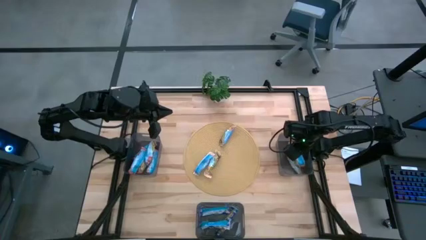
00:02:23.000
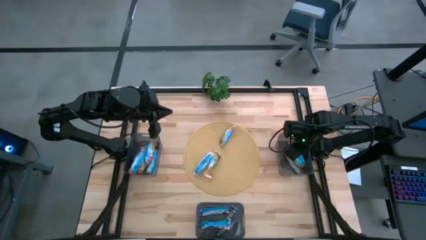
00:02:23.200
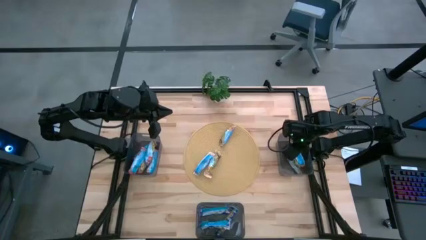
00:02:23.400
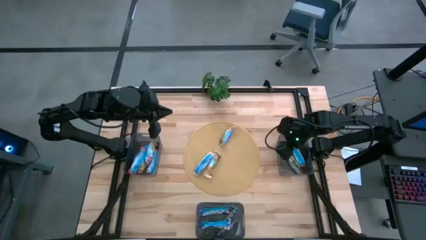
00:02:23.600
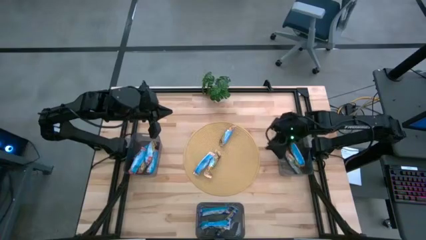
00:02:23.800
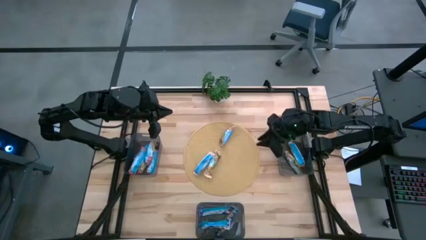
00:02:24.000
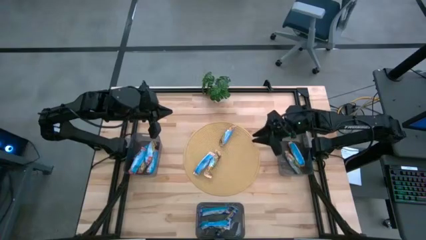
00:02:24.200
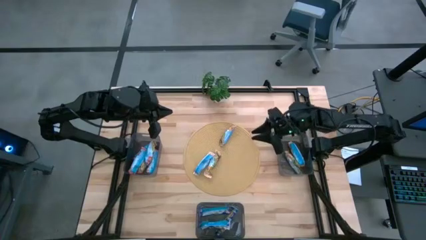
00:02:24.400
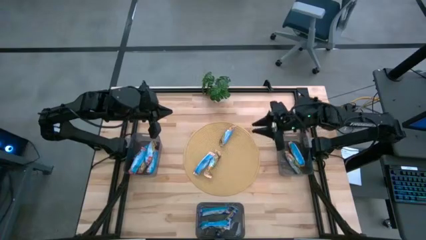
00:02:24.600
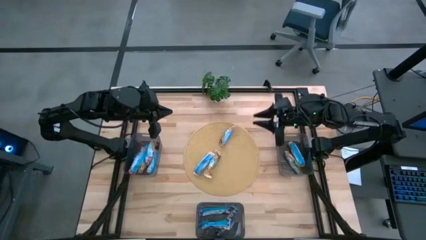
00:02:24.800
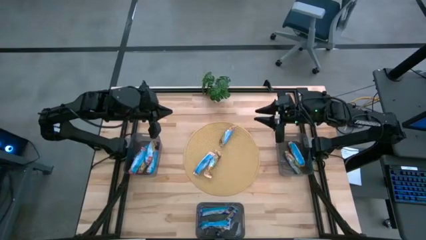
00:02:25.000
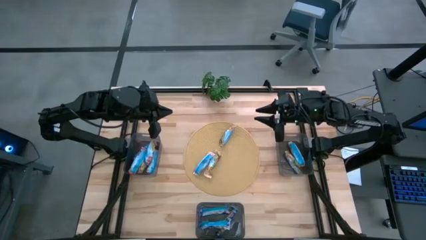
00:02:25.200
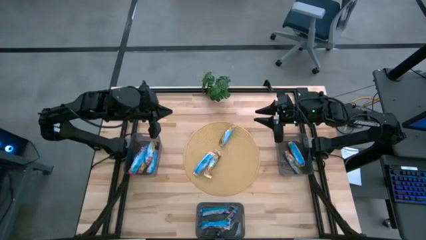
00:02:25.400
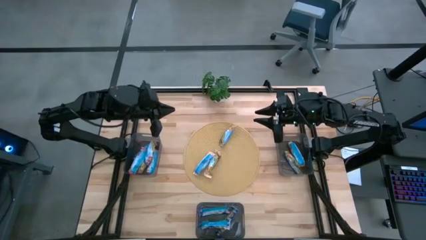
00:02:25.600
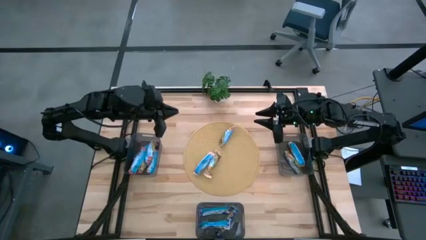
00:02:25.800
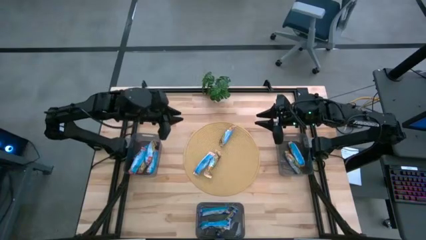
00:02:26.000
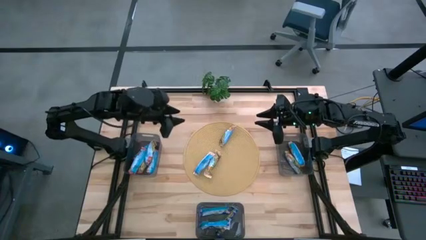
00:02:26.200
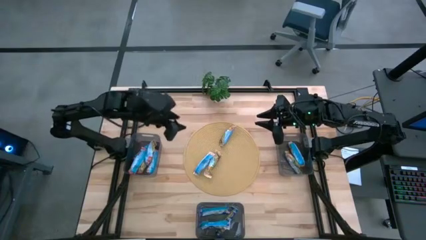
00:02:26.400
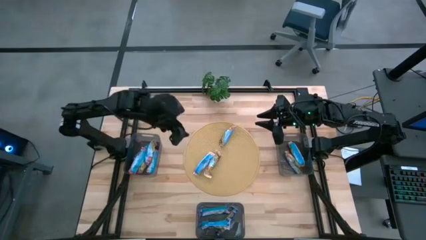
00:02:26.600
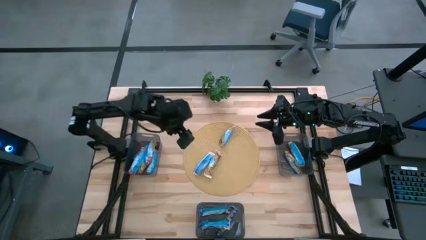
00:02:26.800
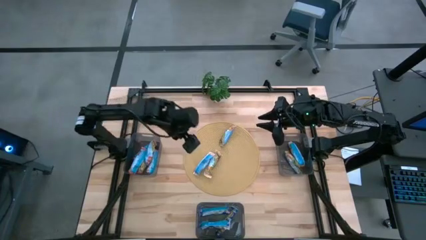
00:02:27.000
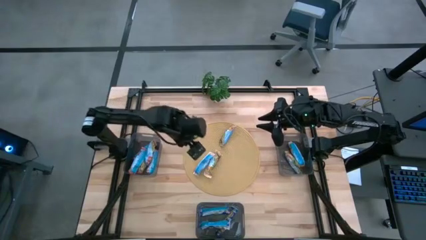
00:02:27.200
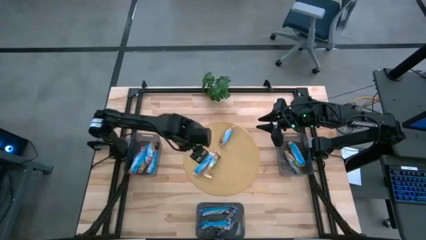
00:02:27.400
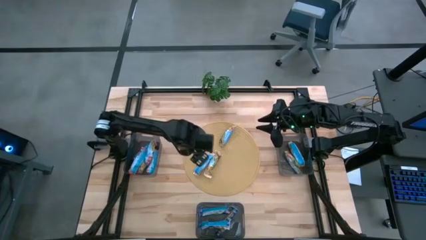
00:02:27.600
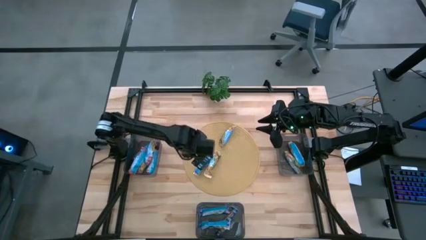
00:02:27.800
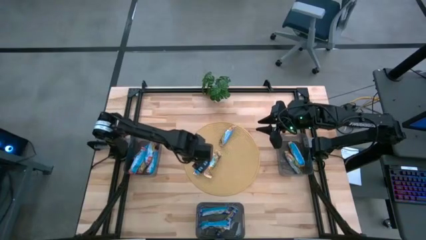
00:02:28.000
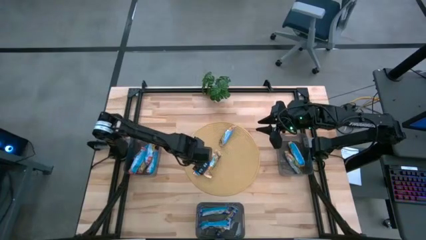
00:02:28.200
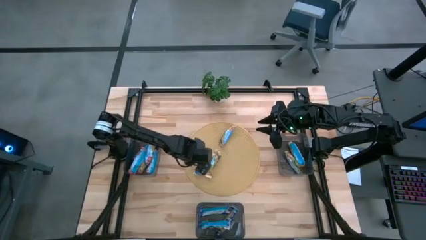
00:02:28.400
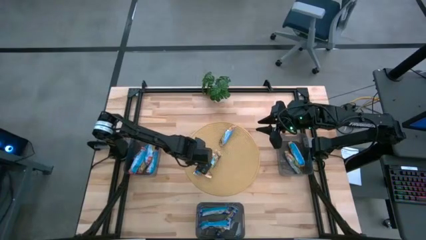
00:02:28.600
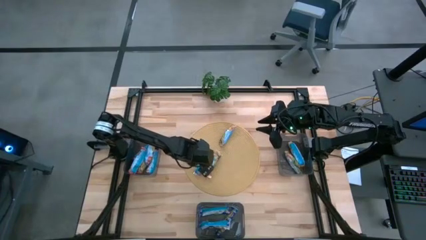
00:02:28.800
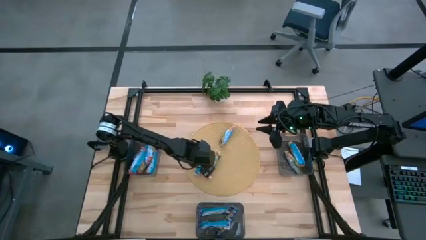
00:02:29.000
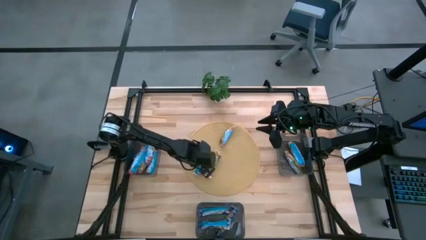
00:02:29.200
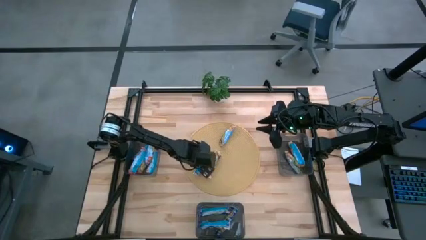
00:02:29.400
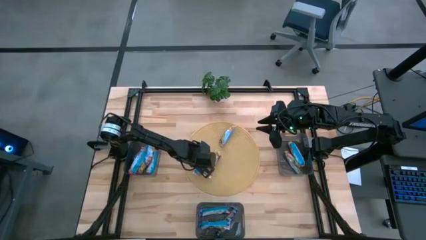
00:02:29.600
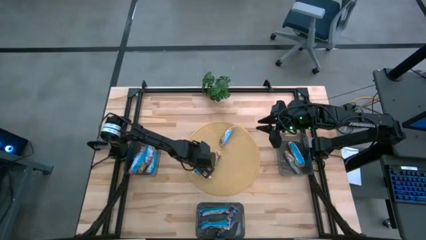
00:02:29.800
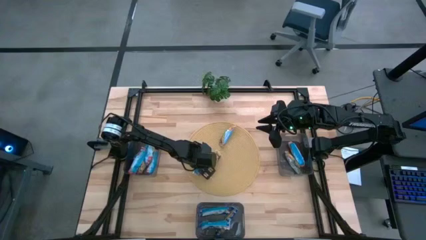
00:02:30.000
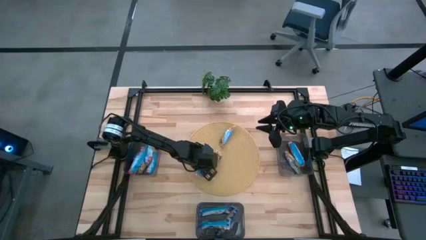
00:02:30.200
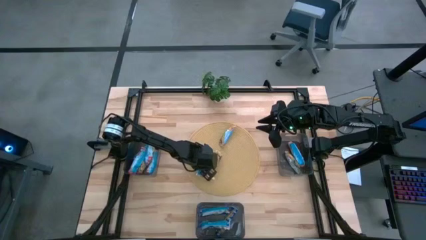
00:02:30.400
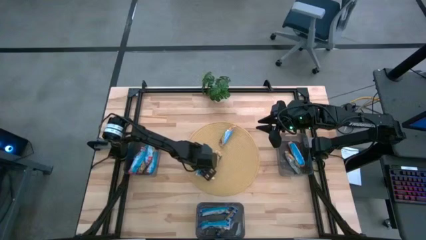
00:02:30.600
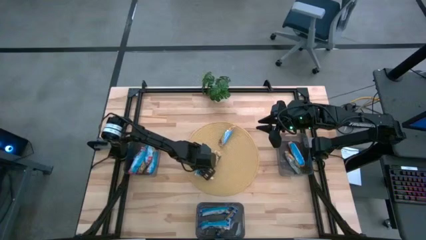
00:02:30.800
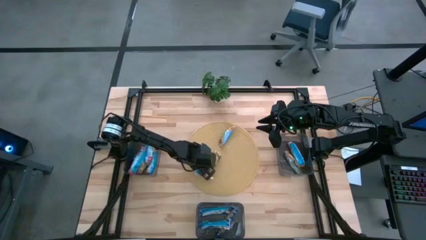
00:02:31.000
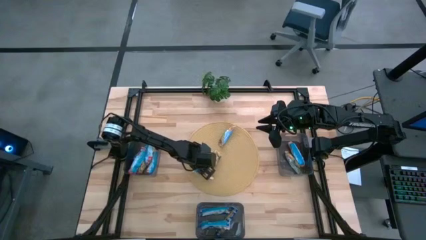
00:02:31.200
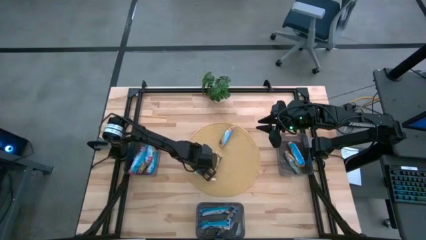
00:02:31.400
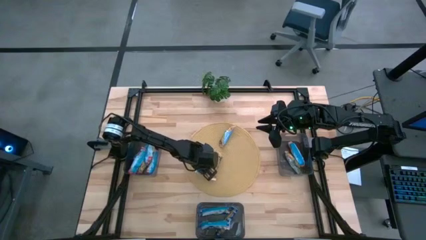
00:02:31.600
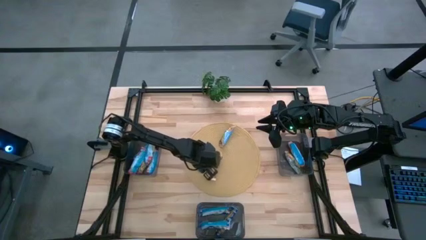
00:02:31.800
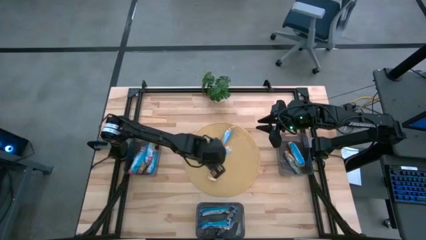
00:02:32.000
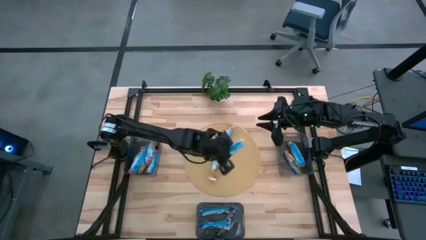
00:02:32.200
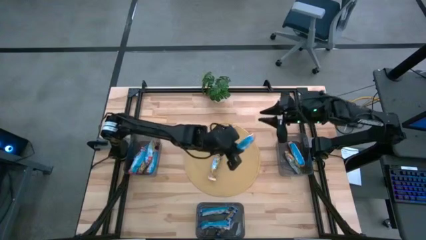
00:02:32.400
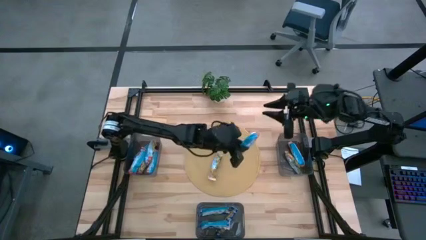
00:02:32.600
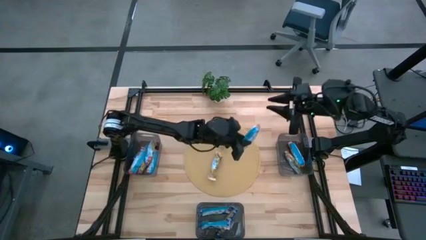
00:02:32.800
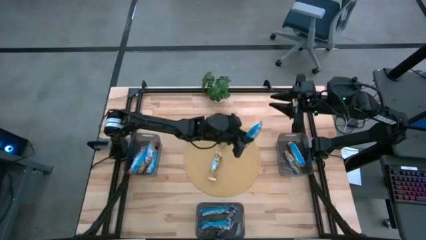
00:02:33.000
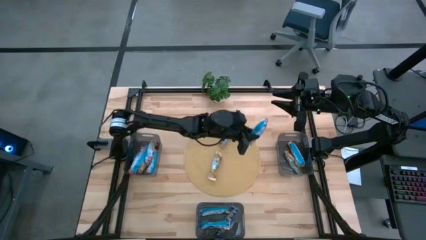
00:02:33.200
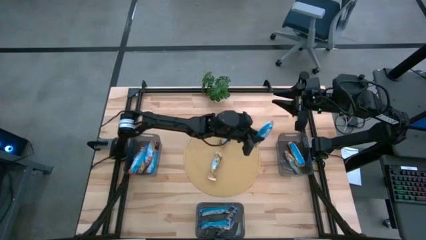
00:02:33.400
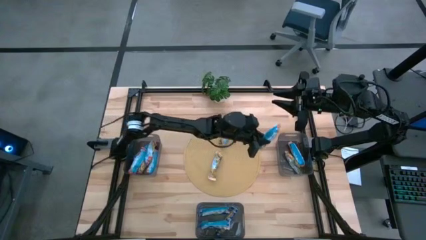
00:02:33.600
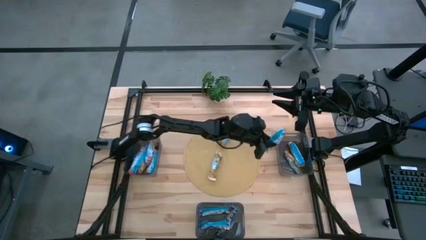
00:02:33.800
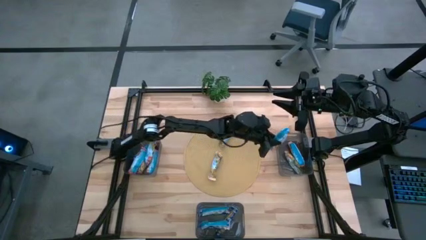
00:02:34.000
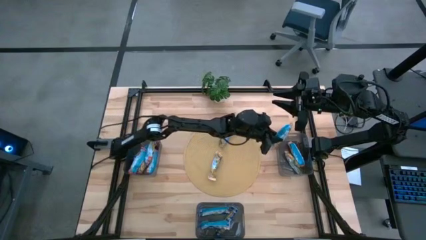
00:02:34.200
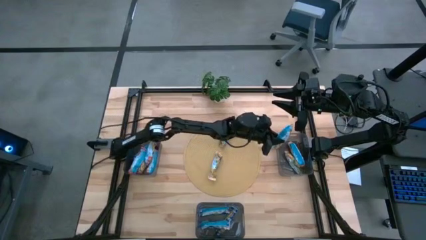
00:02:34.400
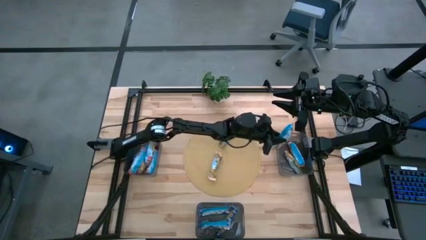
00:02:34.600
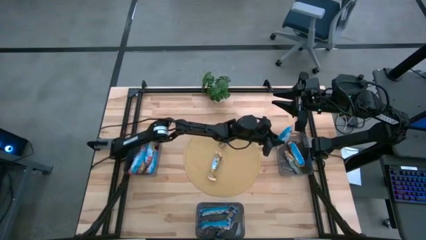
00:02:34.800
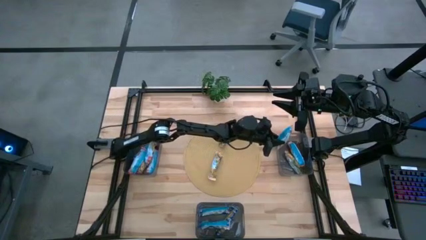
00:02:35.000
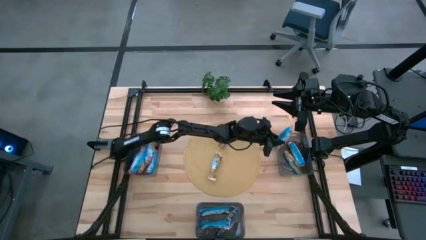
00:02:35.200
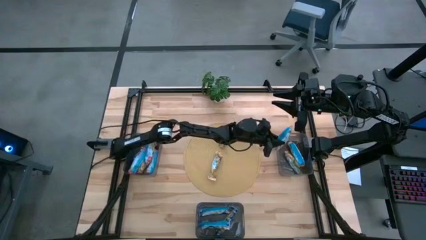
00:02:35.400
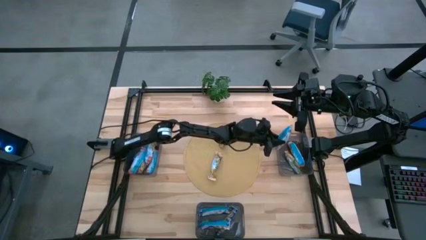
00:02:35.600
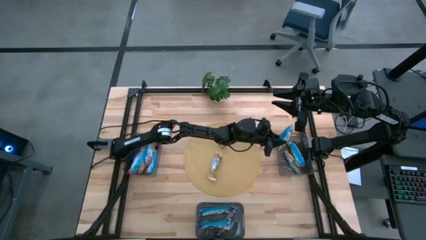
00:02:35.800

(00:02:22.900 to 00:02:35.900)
Task: Pick and place Granola Bars by type
Put the bottom left yellow granola bar into the top right bin
